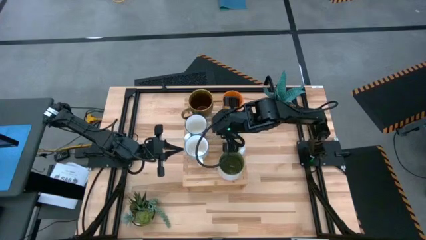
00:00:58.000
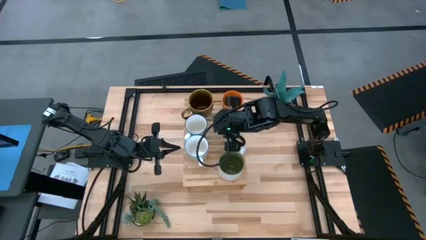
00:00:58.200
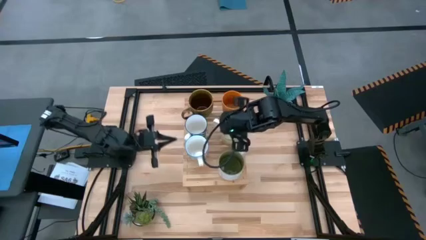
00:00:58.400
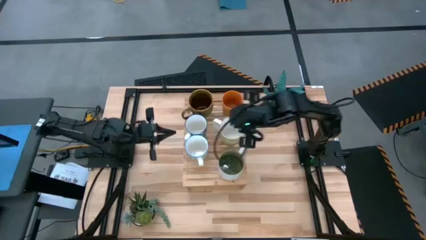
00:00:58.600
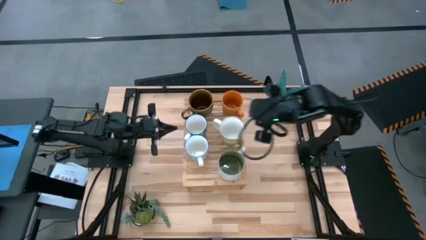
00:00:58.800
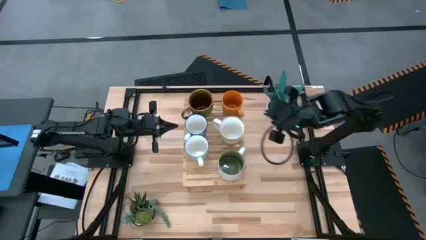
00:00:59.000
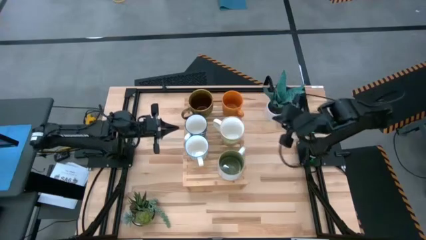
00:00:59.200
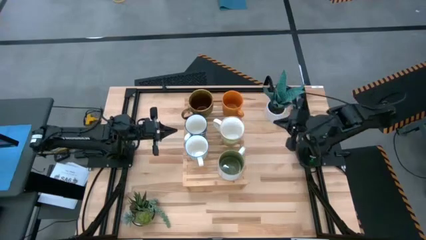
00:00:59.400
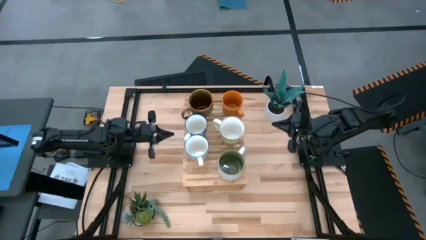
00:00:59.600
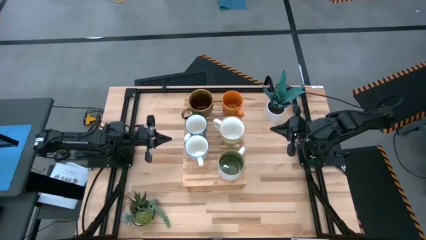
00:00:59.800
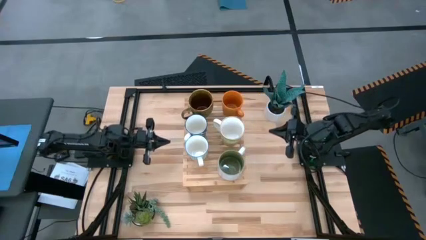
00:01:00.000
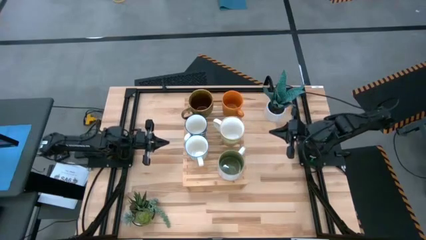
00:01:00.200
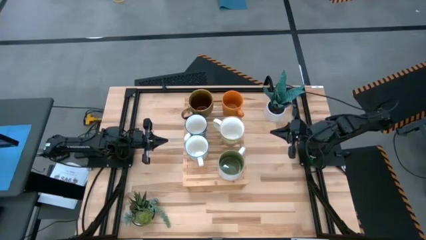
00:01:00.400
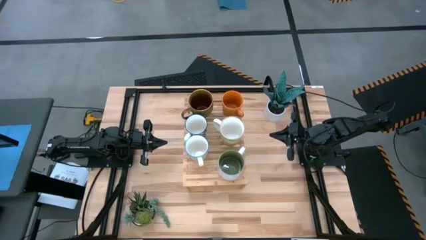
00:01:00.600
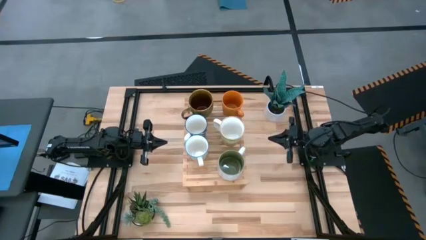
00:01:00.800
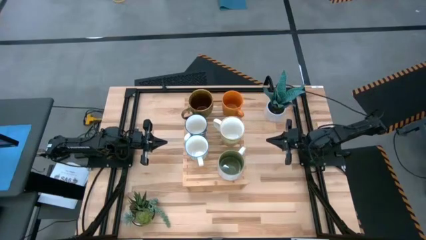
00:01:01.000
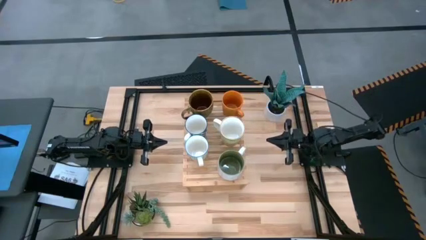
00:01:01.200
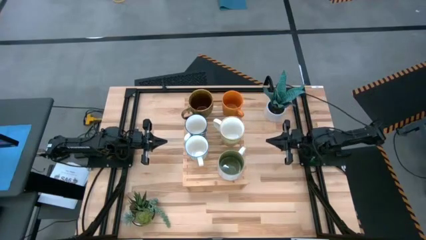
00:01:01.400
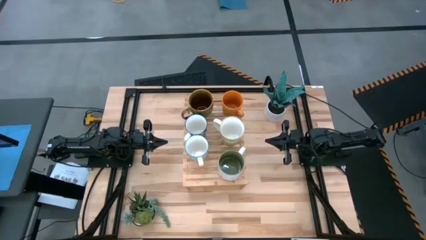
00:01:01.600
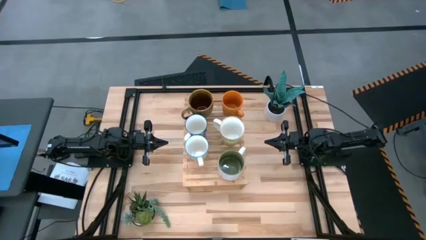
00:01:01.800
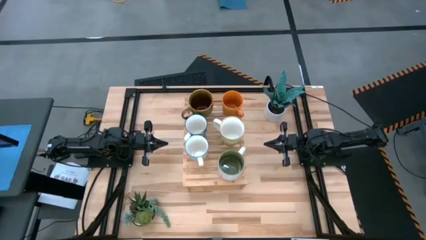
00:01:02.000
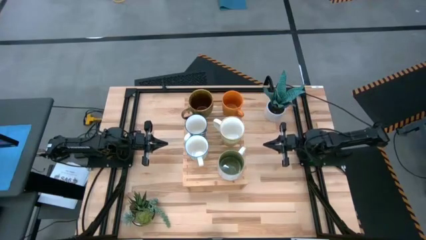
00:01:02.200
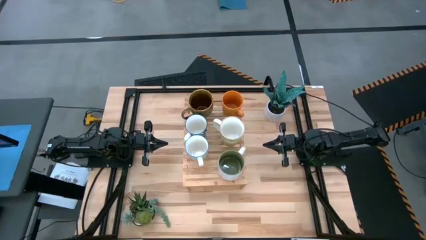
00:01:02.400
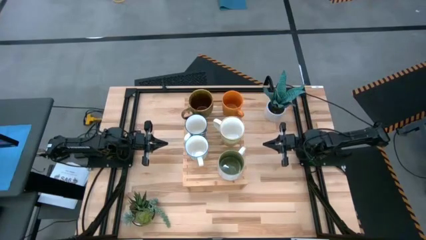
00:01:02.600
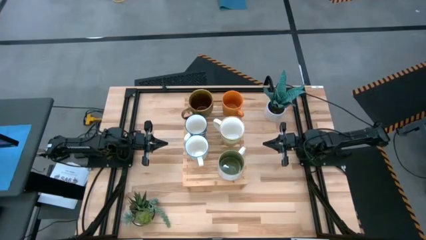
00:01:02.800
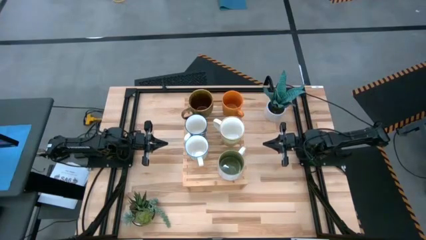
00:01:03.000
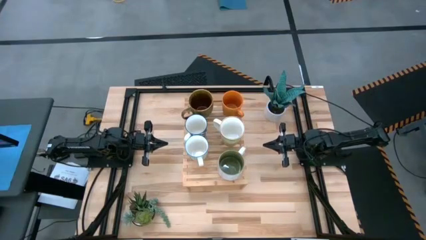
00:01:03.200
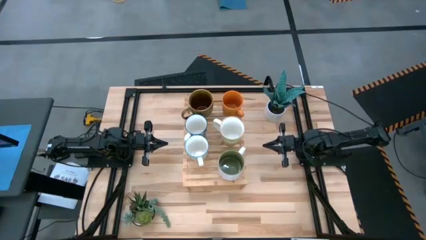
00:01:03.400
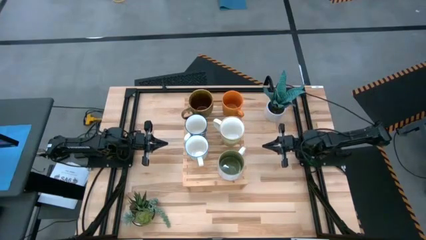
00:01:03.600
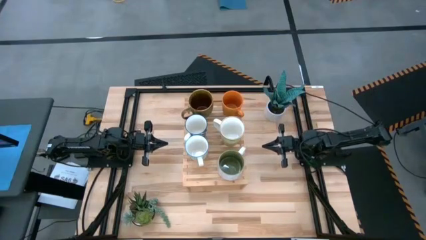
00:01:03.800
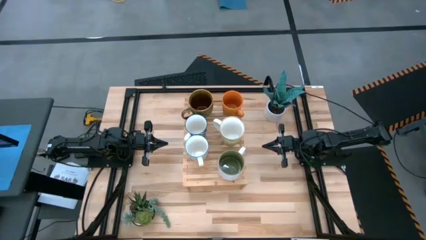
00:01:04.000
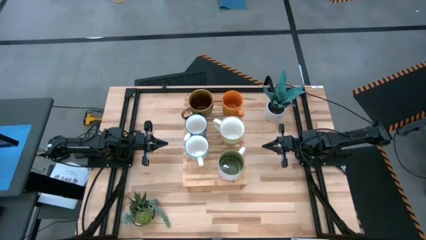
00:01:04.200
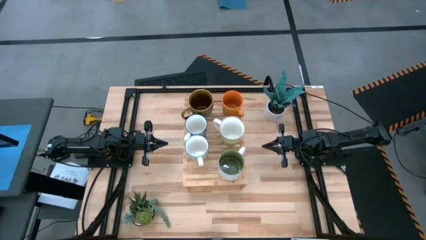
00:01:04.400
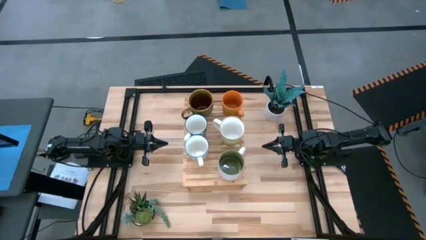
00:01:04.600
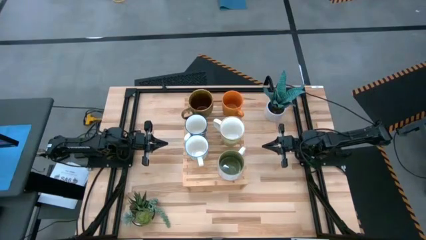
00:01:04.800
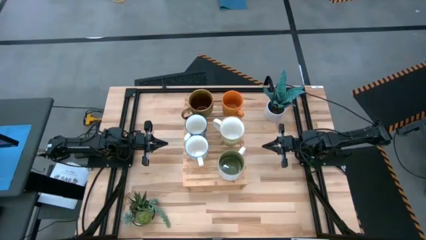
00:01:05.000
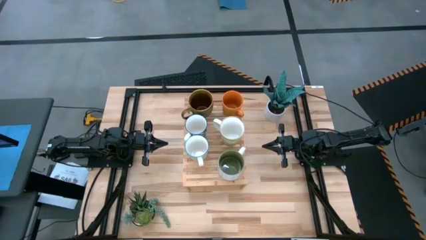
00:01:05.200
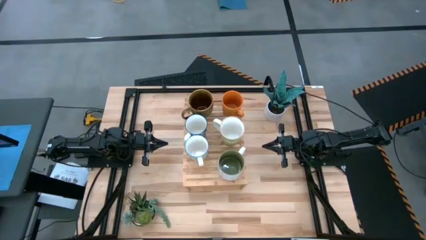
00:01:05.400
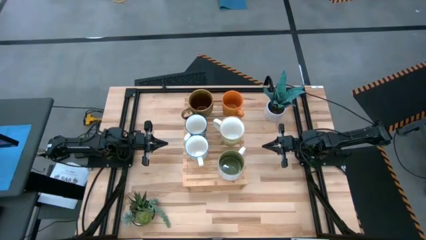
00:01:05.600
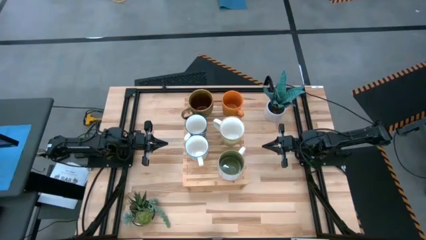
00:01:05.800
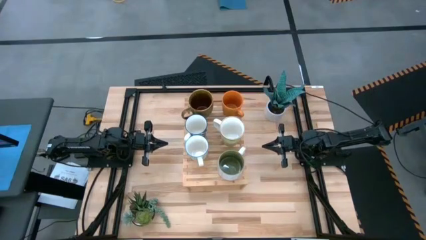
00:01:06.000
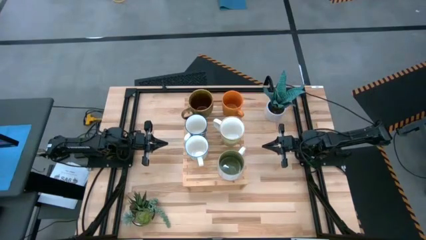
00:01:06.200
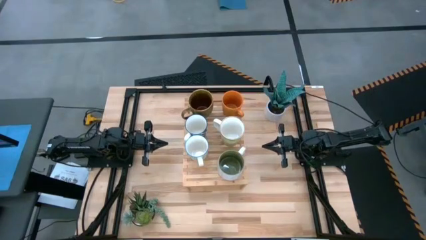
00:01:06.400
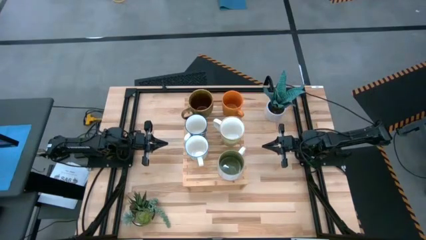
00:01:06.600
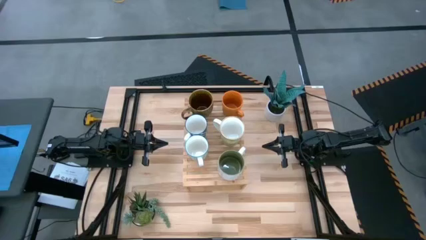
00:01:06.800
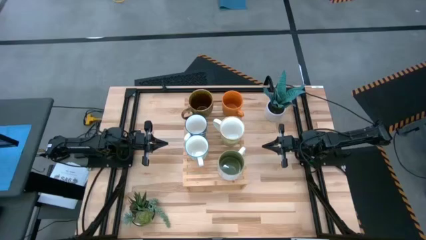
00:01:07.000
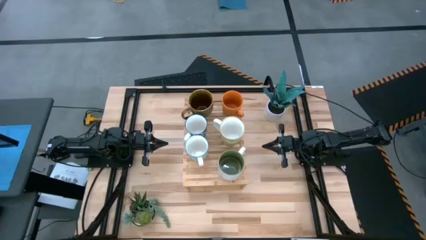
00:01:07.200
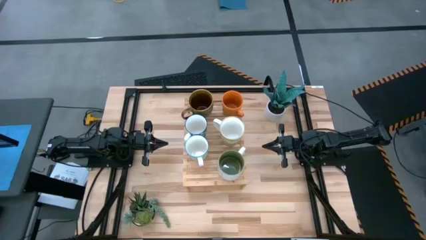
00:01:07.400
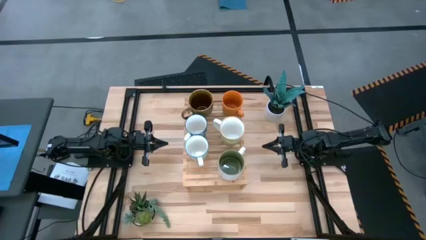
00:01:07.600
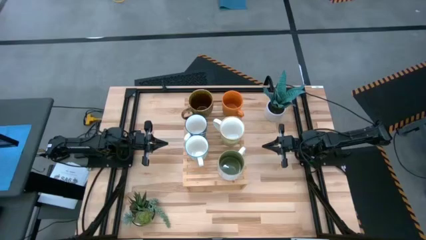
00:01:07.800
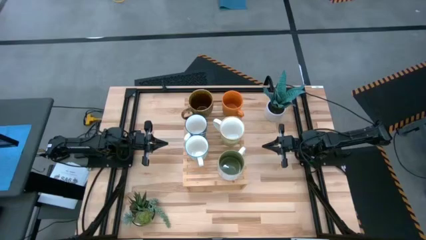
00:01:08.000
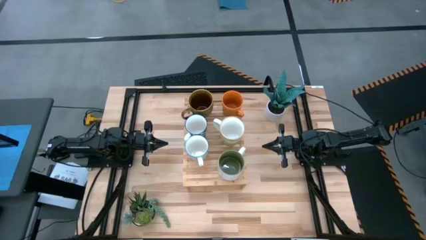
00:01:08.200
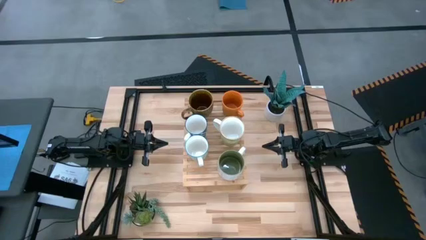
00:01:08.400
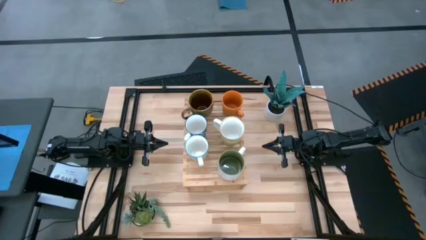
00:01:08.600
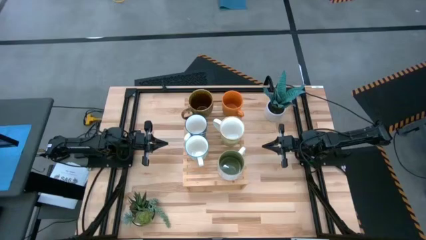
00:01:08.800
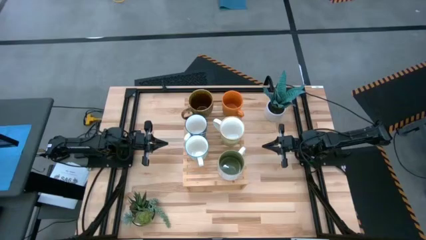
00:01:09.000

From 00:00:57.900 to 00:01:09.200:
Task: Place coffee mugs
Return to Home Position

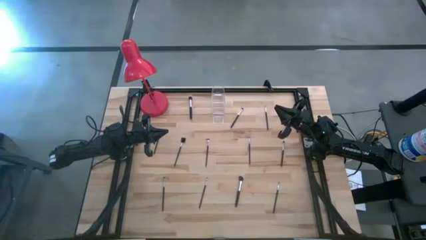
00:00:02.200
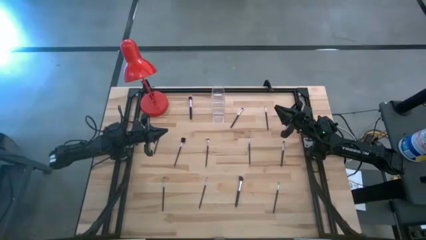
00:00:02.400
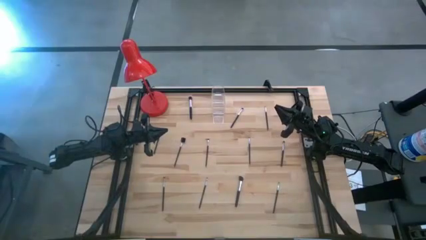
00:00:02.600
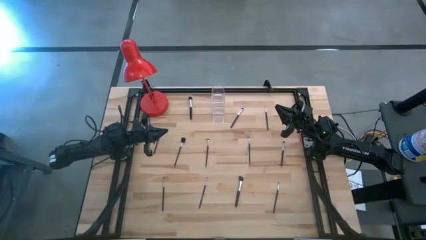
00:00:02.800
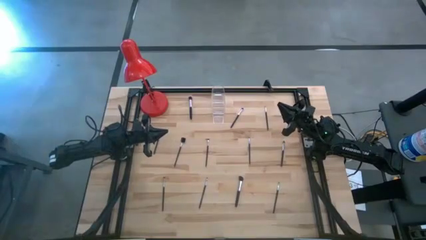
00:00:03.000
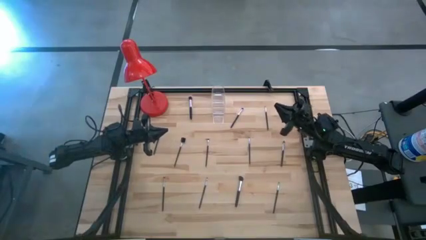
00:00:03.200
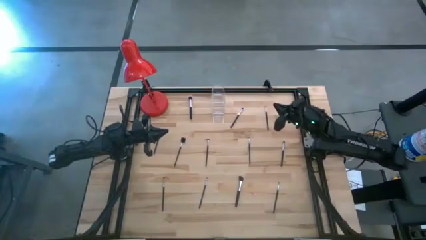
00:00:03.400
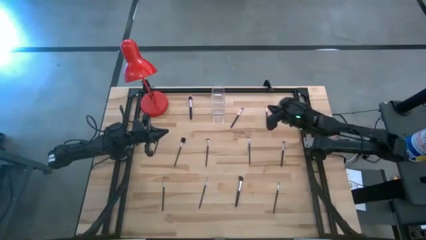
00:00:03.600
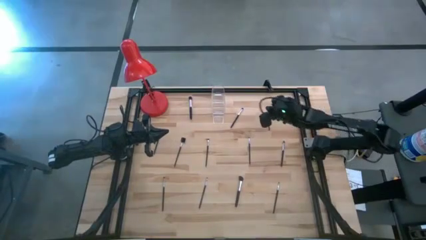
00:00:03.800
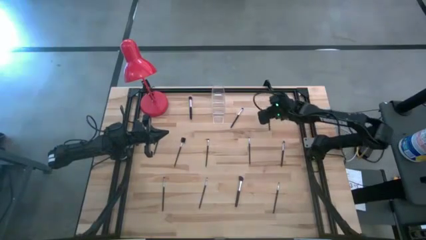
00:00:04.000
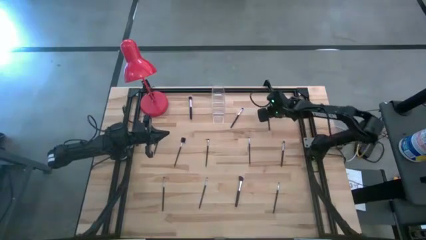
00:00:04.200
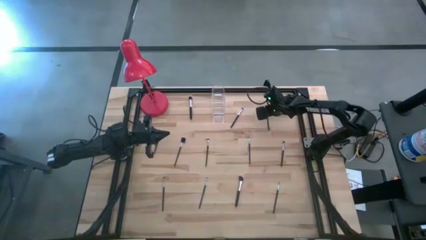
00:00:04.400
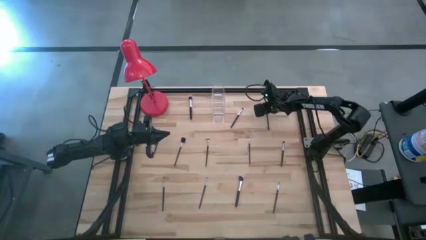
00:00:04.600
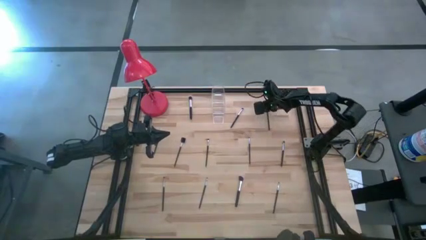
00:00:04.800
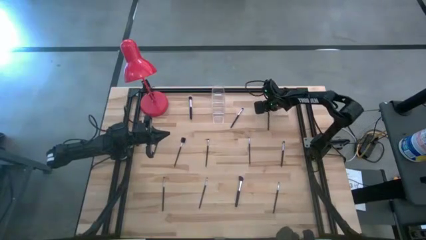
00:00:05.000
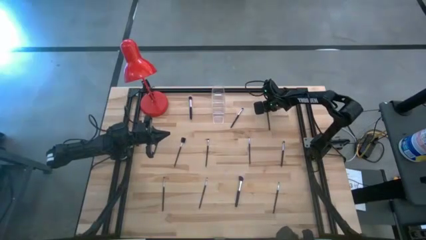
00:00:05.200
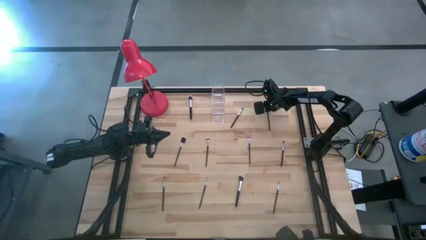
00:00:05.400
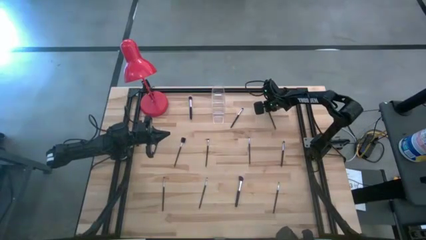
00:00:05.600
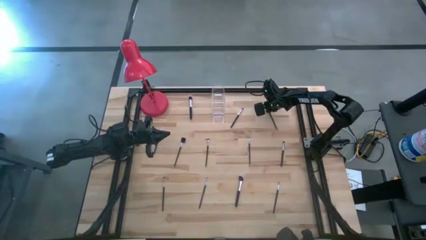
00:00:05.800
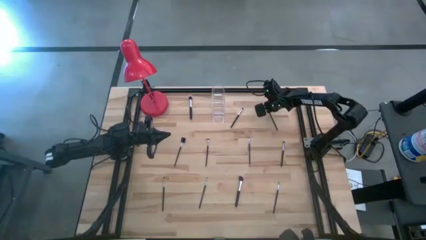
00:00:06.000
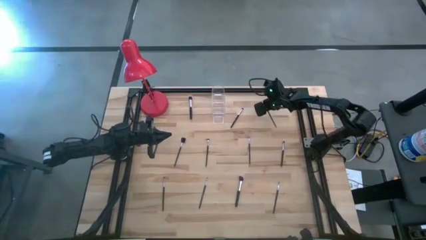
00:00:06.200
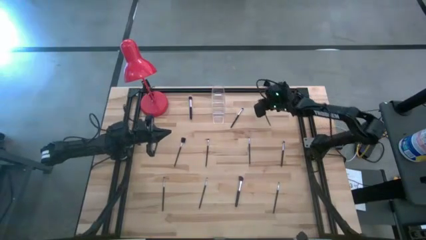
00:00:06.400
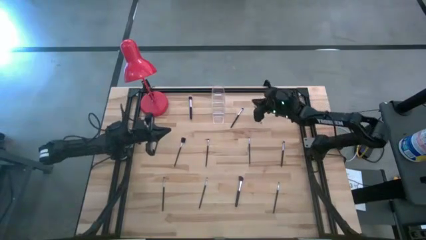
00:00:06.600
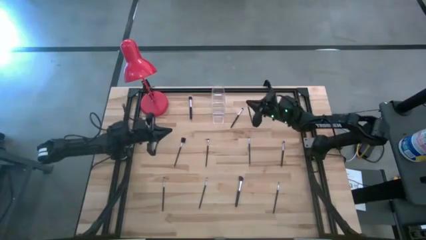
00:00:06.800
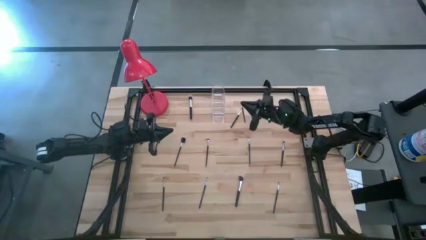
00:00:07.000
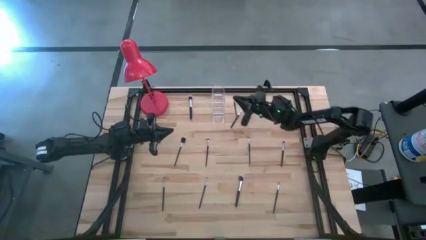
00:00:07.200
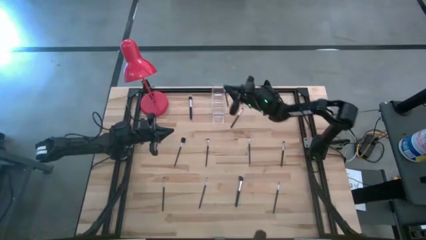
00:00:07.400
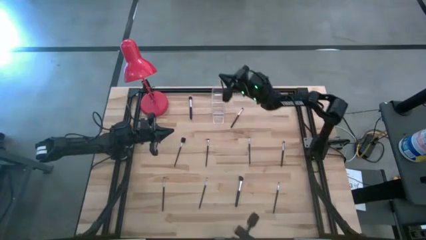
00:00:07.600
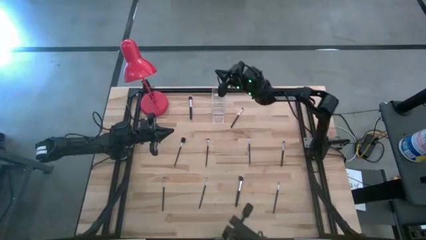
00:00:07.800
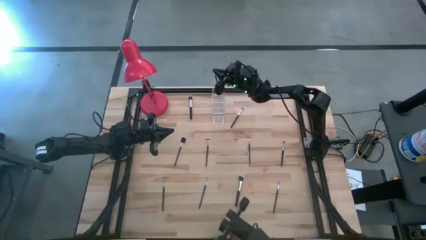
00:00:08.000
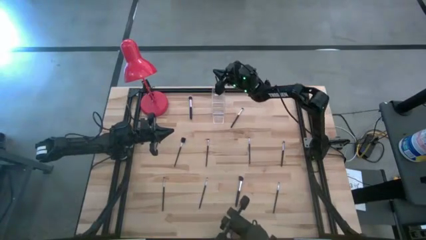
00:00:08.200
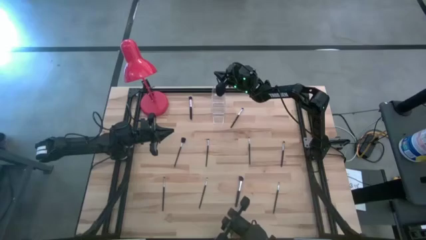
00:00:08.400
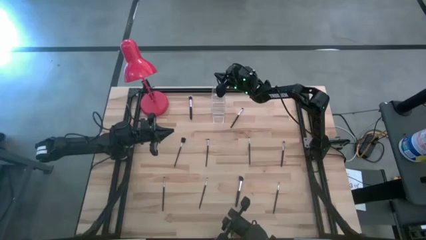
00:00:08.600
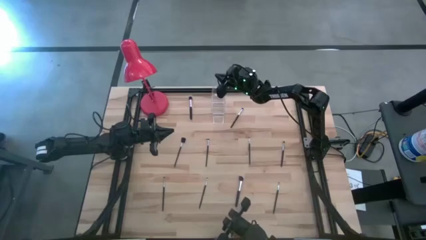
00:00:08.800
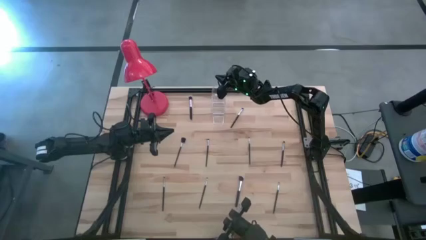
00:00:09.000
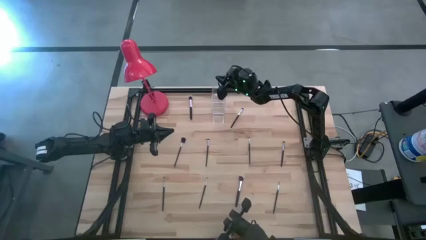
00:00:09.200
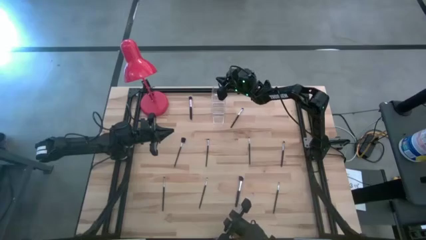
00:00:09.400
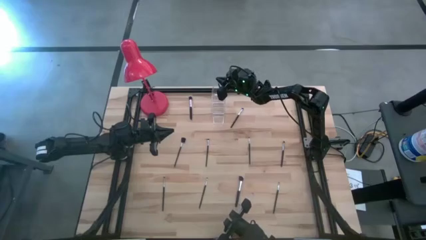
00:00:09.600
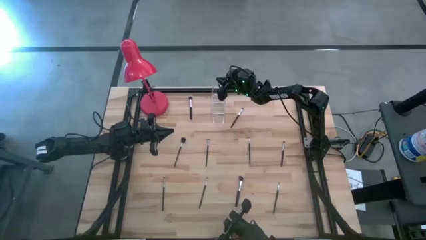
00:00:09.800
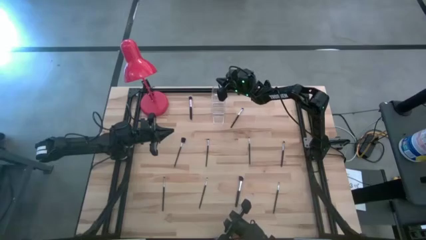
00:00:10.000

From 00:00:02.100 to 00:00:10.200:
Task: Put items in baskets/containers
Put the black eyeshadow brush into the transparent organizer
